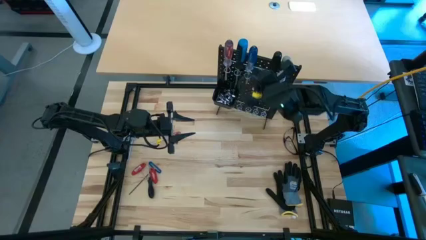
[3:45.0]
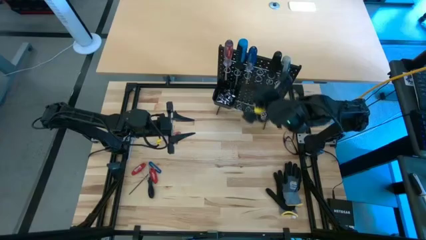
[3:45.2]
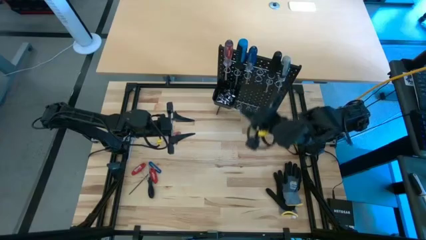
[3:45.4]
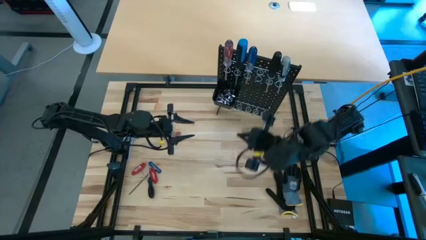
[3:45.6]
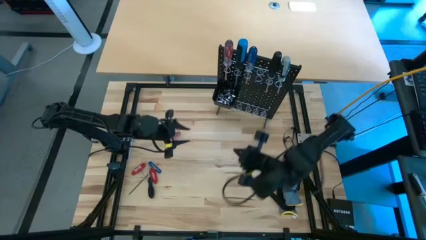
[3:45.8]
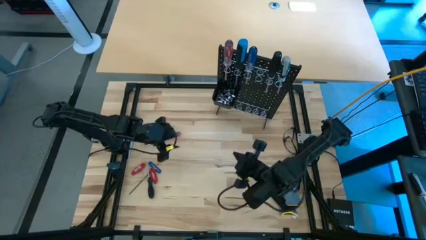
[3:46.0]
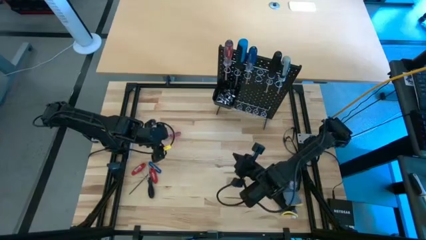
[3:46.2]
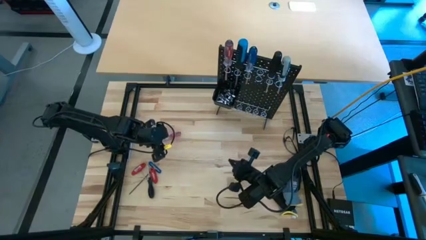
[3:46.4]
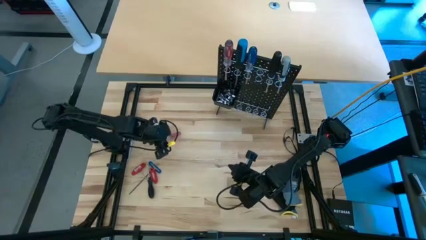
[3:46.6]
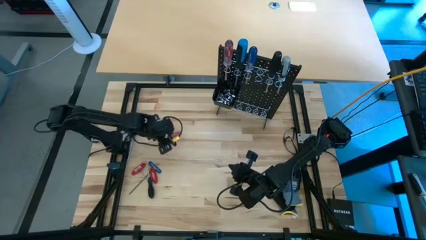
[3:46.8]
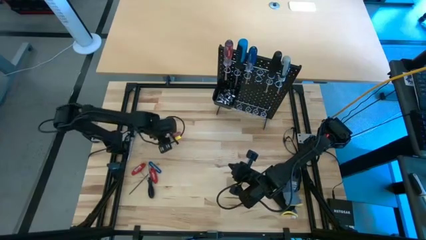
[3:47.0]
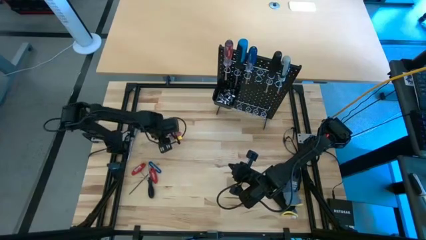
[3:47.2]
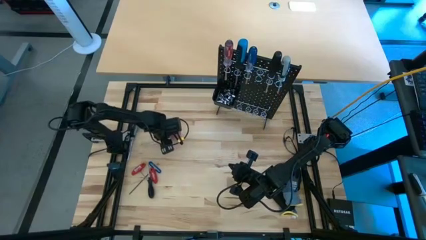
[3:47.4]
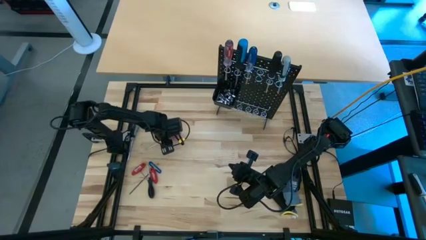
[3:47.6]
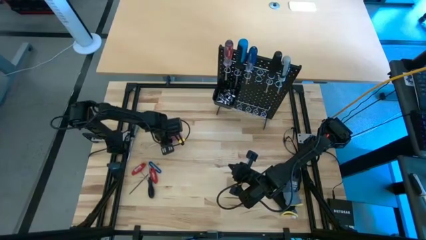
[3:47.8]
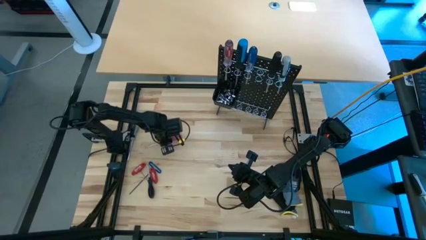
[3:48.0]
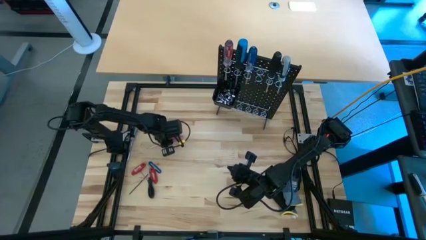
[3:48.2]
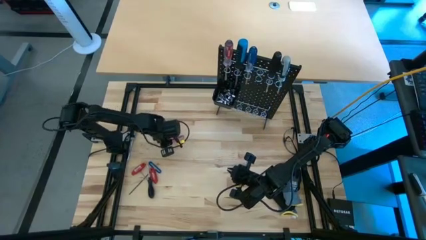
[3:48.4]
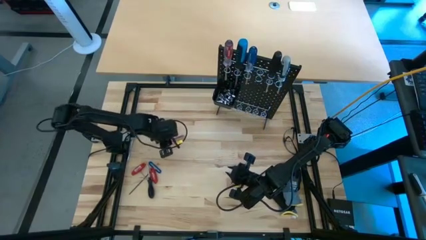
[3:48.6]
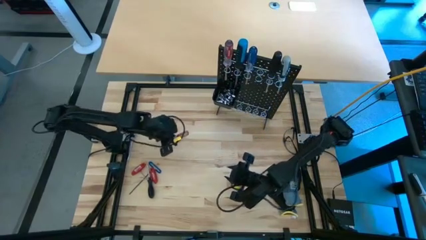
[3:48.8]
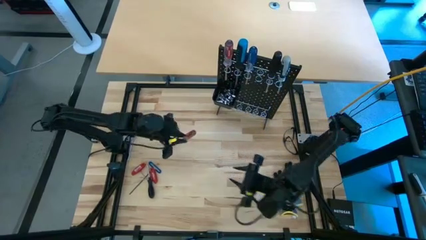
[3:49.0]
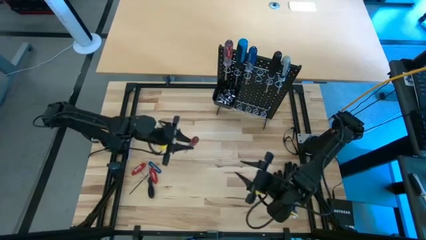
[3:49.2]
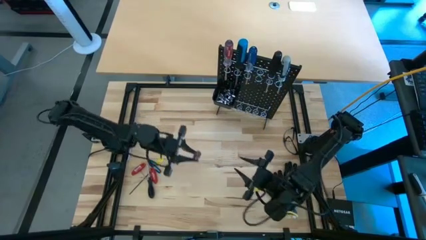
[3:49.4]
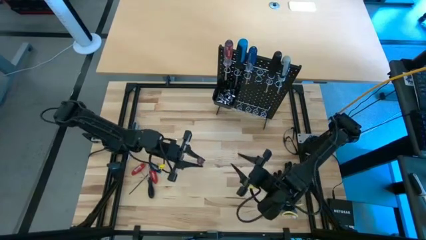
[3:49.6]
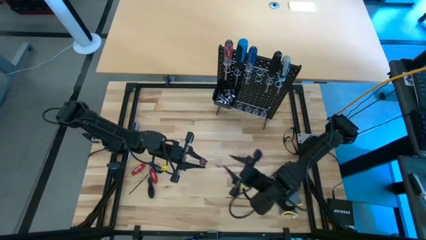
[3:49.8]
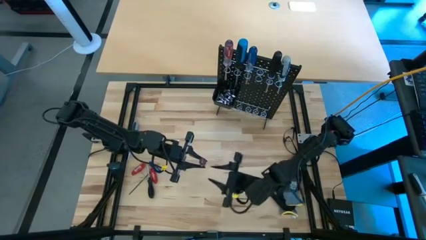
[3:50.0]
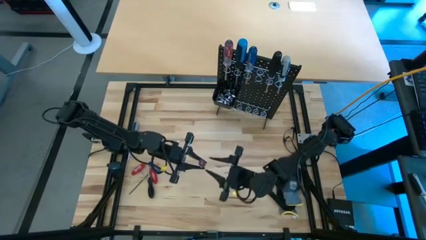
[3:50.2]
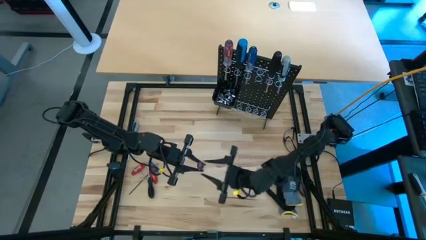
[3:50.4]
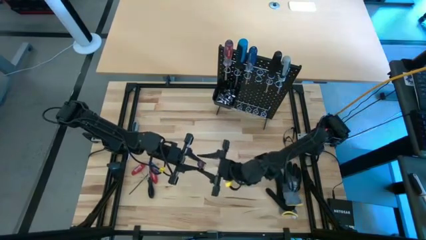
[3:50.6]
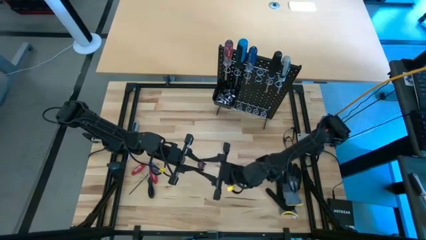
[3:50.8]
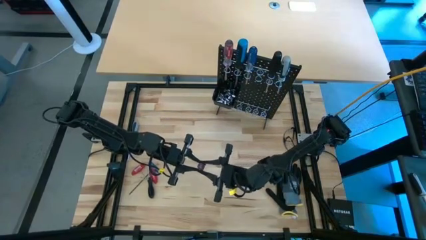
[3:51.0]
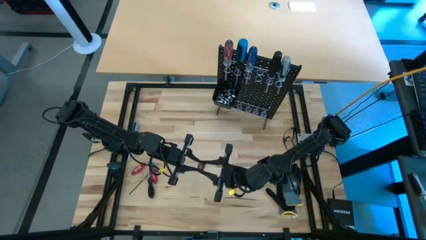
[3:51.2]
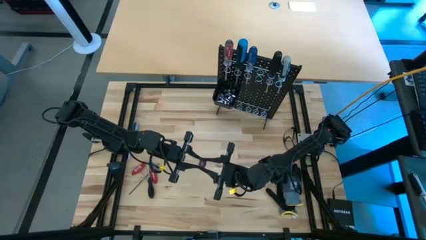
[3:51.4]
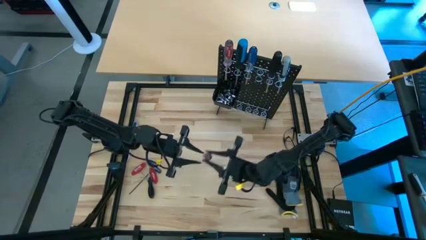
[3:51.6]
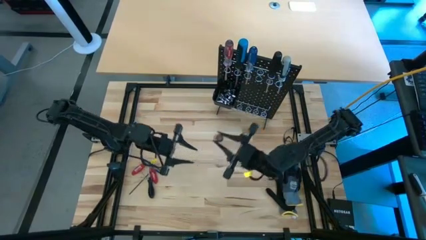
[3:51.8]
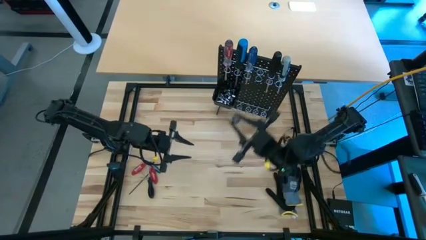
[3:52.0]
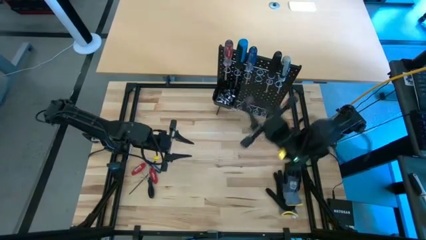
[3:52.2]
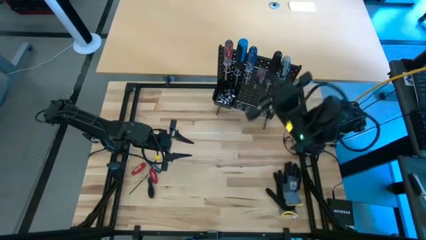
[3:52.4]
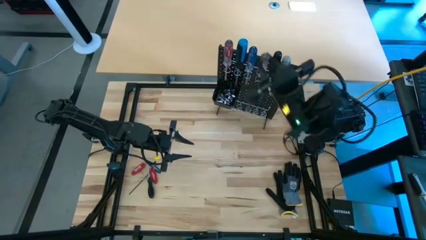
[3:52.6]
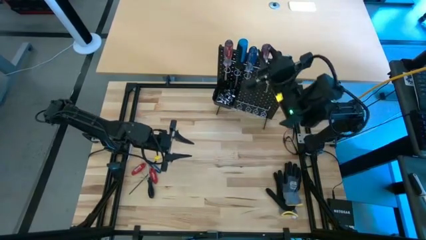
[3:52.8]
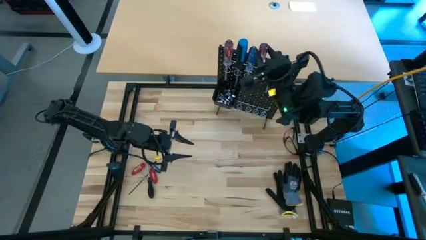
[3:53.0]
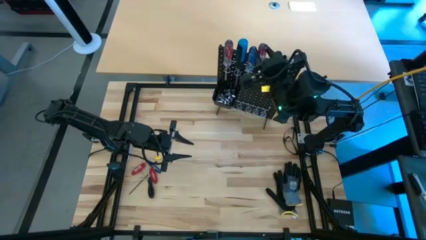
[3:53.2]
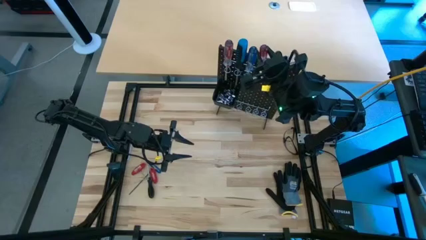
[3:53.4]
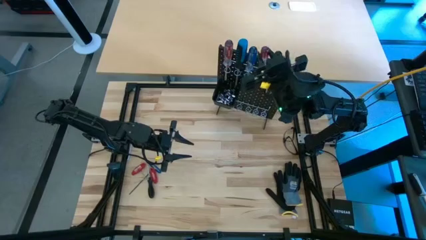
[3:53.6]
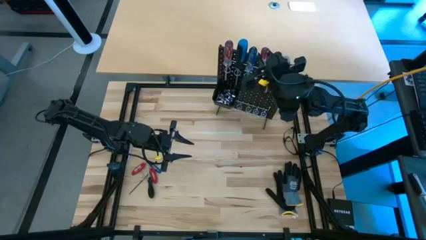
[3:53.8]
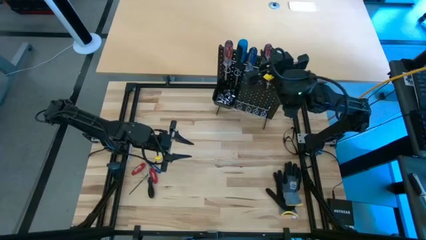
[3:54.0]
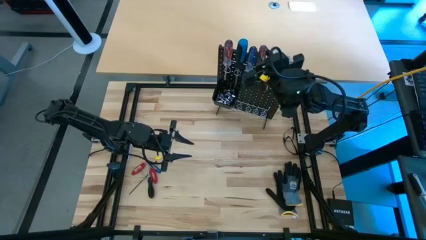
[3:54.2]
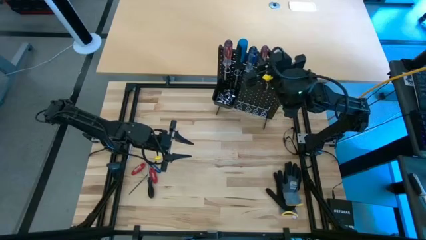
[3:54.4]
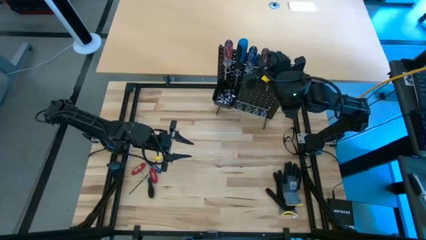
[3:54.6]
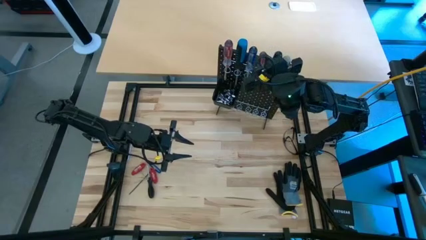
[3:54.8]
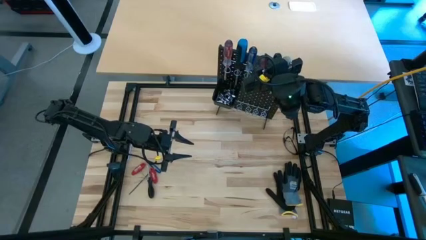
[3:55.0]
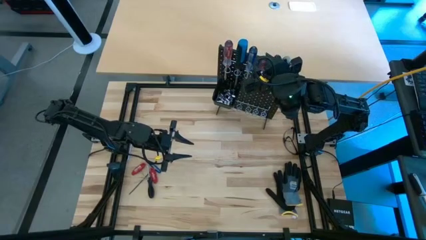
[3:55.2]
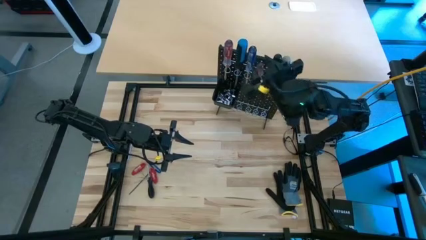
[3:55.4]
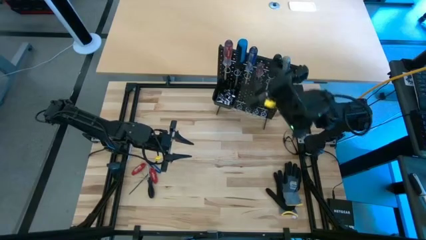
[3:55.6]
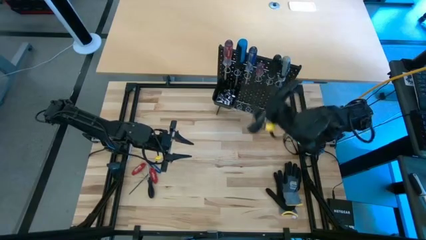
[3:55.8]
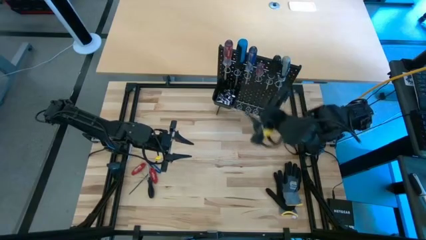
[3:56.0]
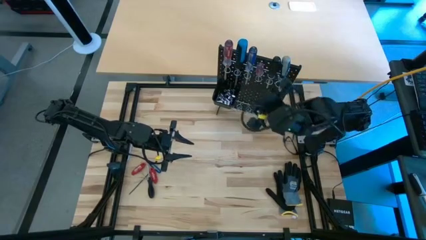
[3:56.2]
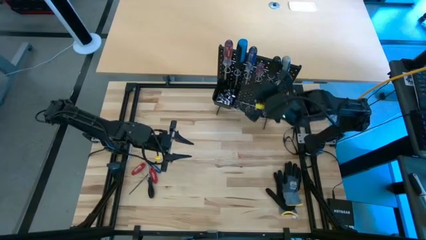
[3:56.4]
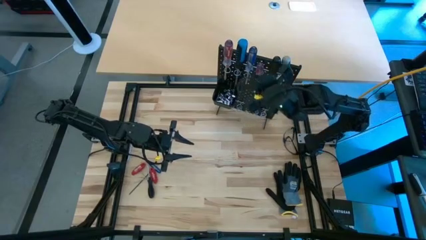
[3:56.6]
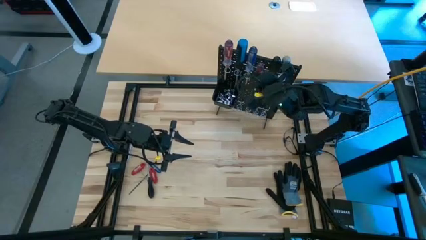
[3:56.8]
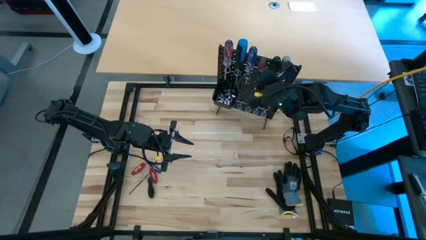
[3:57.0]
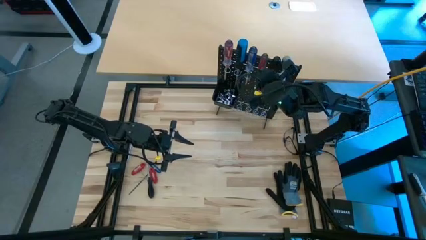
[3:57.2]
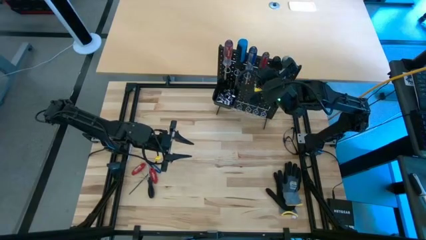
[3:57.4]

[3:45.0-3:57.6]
Task: Hang tools onto peg board
Hang the red screwdriver on the black pegboard
